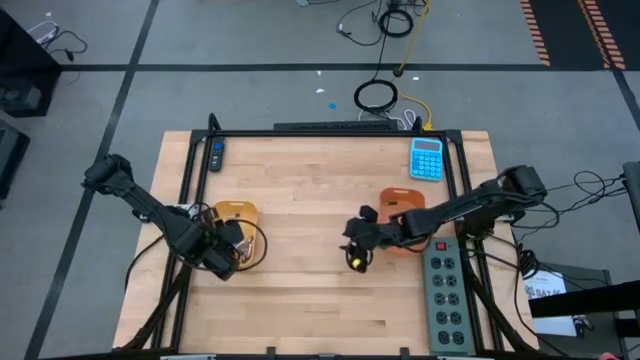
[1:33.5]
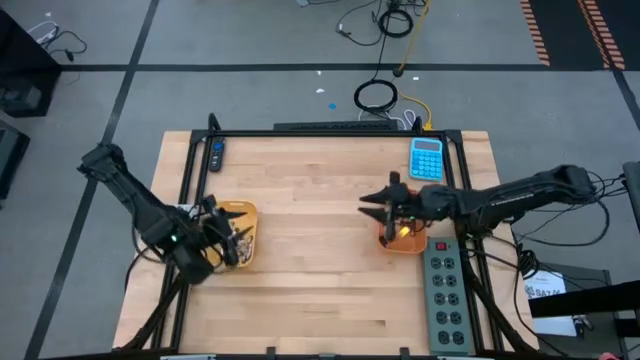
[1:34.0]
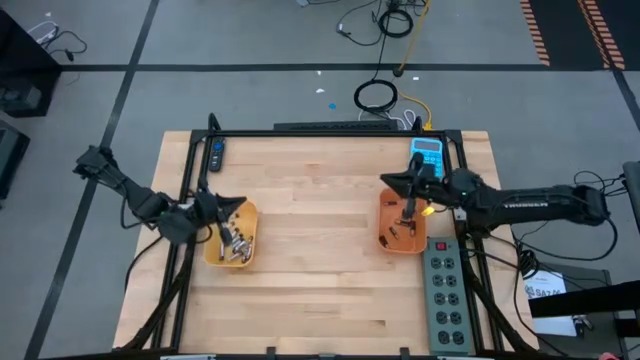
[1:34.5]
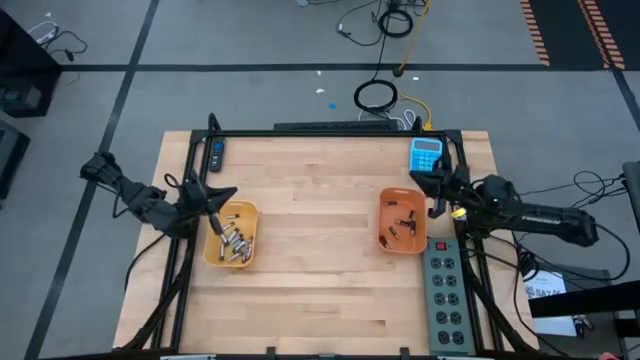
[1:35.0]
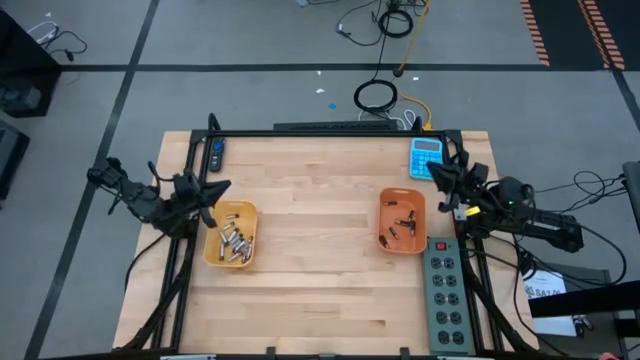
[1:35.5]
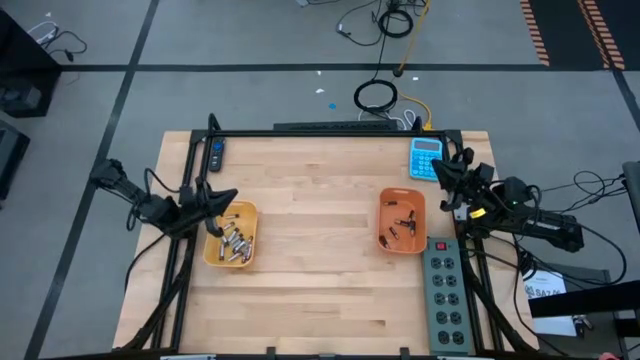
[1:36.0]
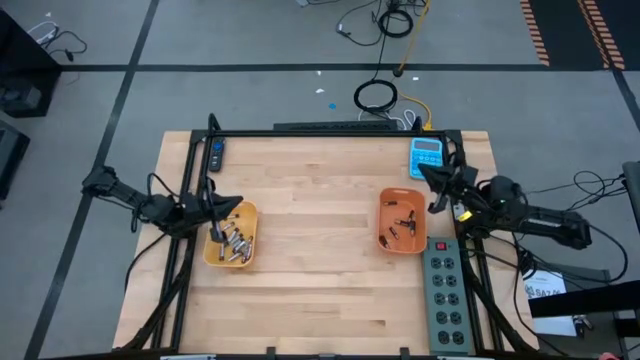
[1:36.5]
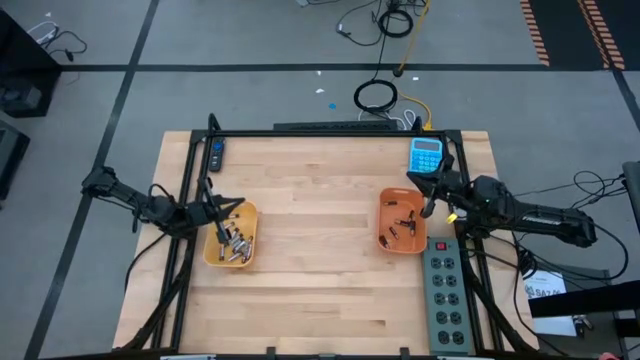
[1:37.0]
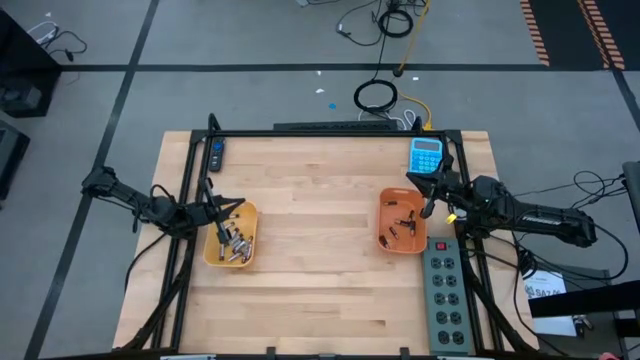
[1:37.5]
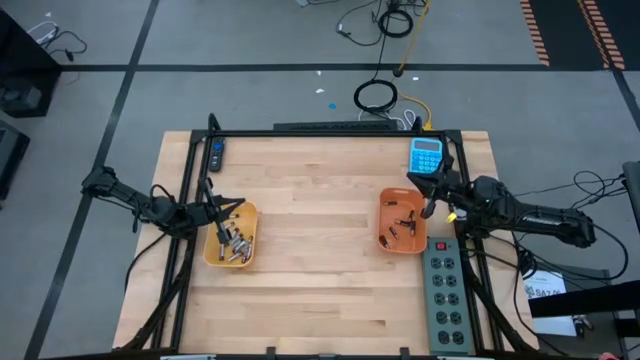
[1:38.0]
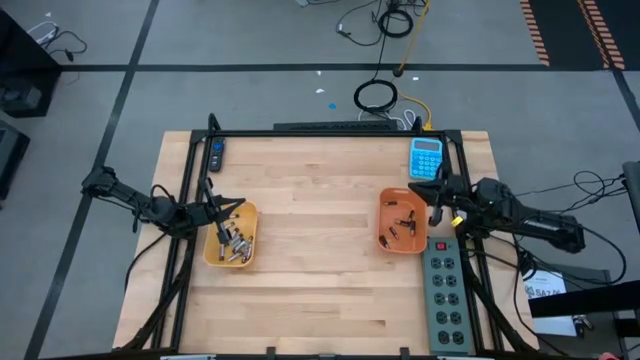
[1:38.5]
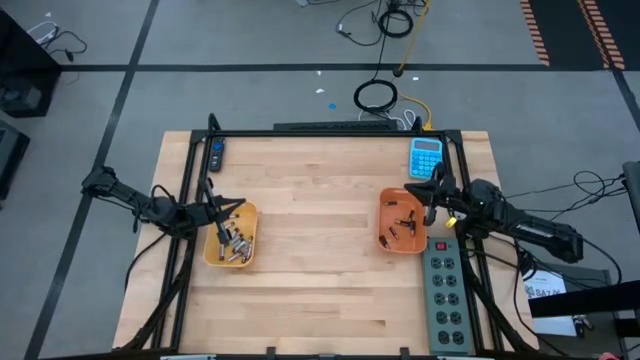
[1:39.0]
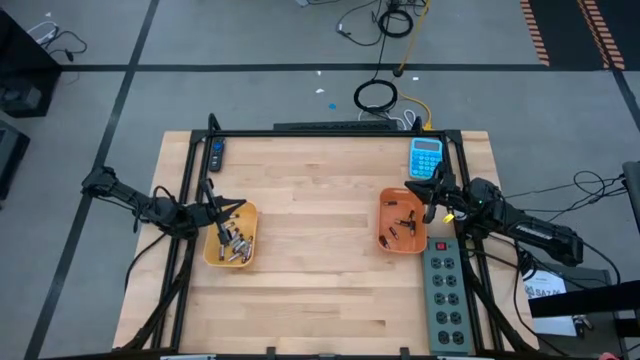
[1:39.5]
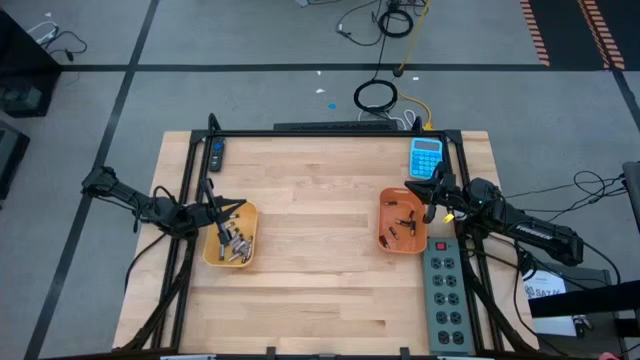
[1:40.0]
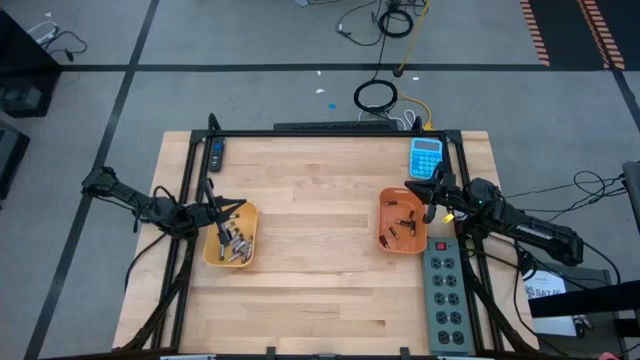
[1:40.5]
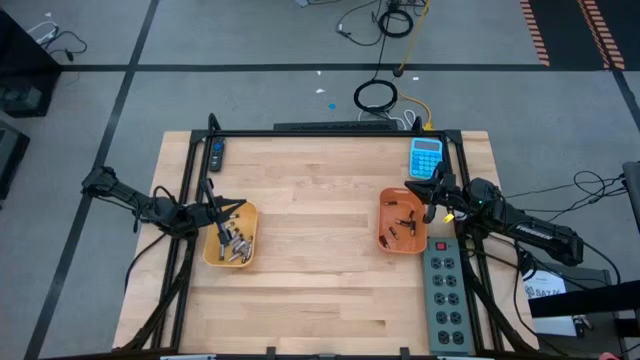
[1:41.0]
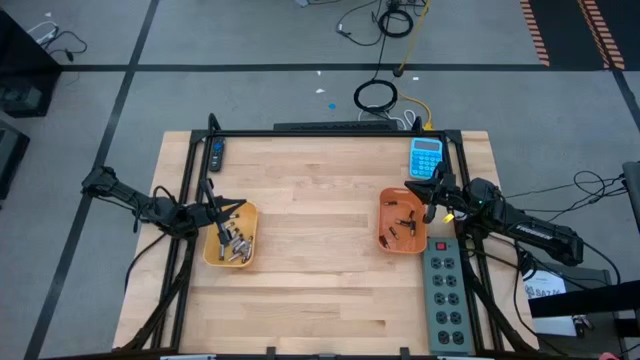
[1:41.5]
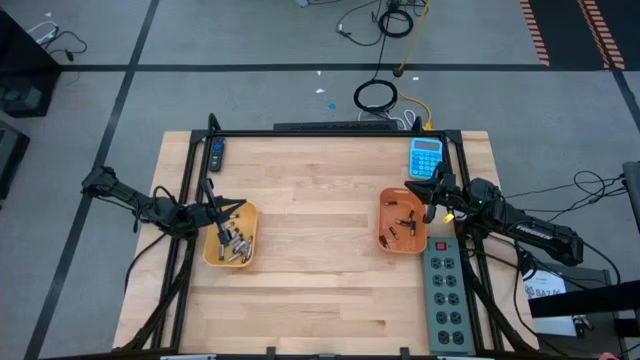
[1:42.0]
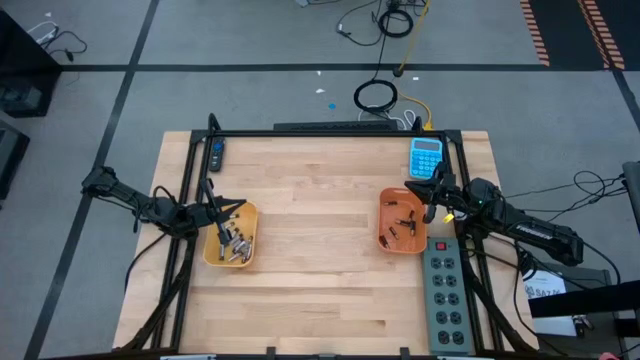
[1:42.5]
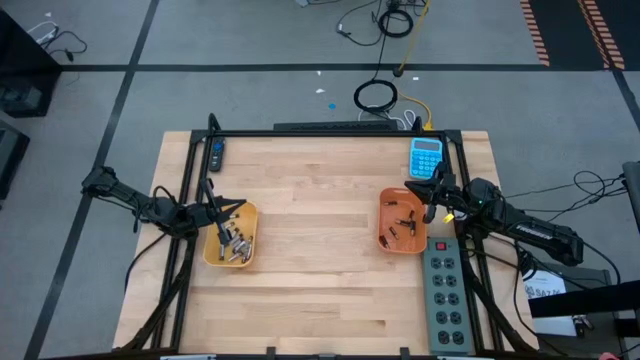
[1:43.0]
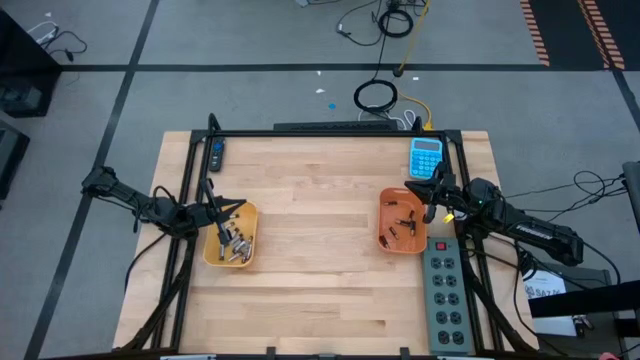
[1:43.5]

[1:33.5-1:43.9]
Task: Sort batteries
Return to Home Position

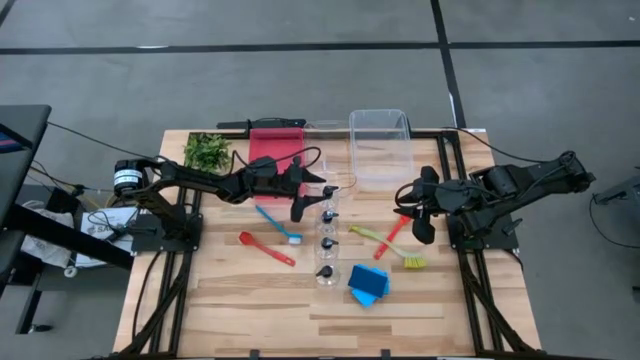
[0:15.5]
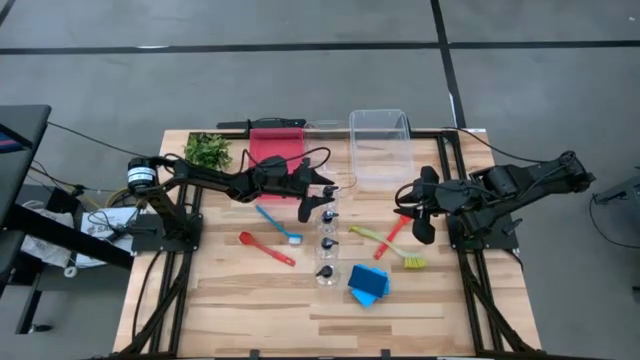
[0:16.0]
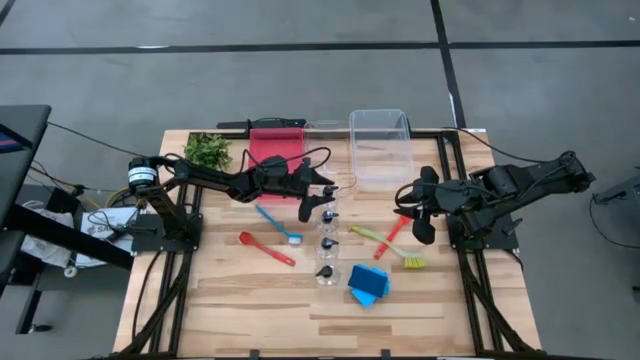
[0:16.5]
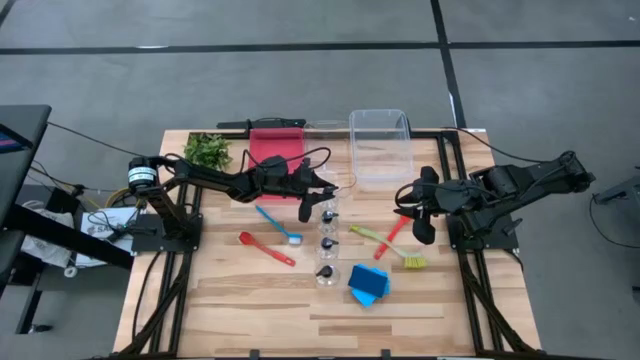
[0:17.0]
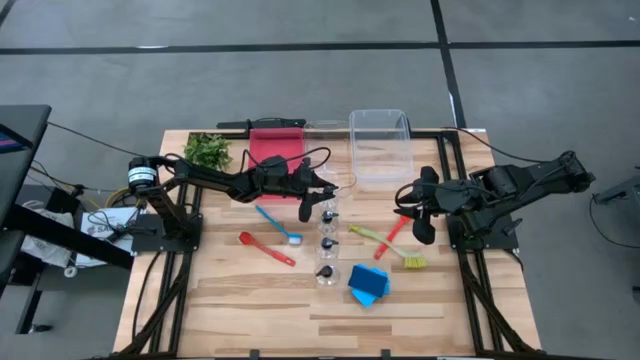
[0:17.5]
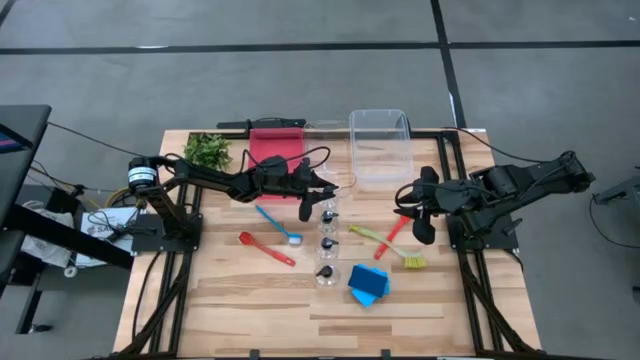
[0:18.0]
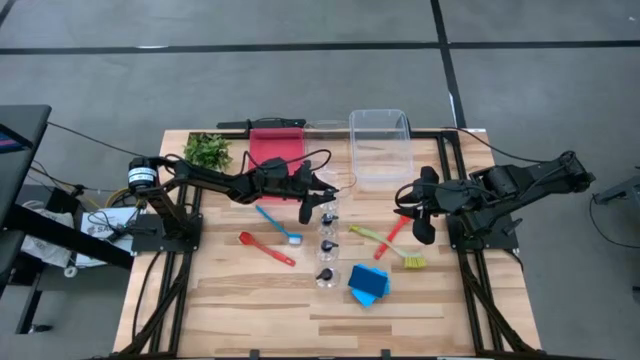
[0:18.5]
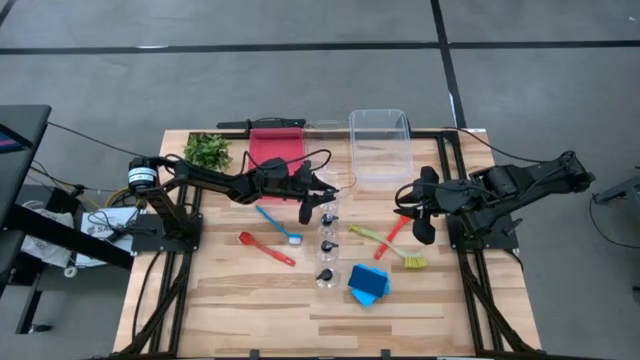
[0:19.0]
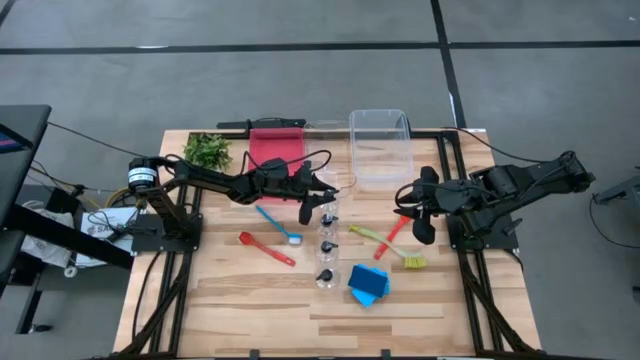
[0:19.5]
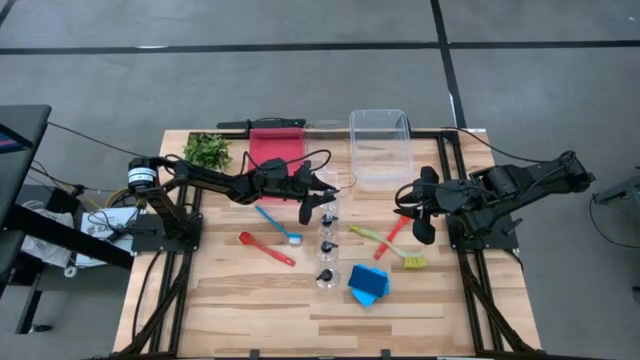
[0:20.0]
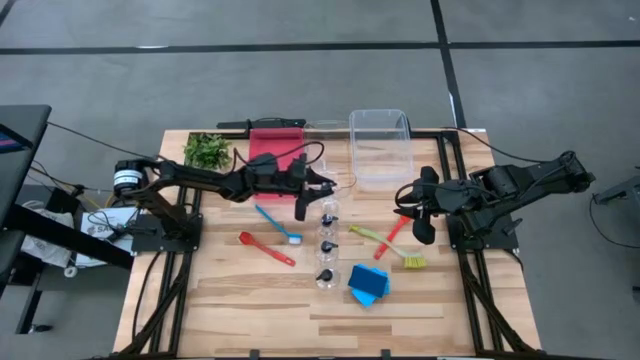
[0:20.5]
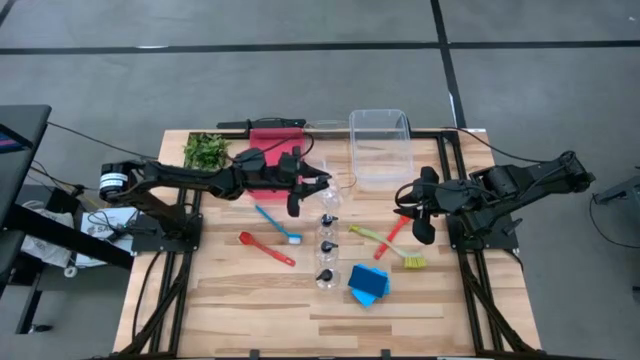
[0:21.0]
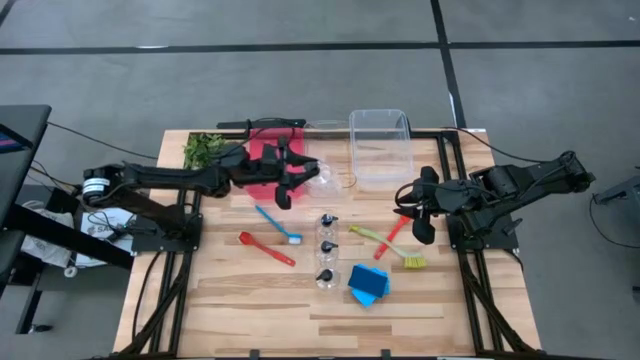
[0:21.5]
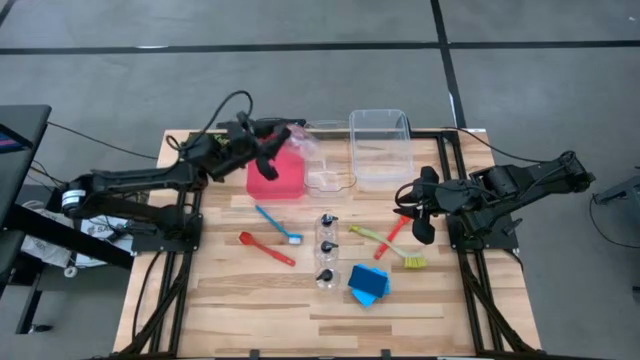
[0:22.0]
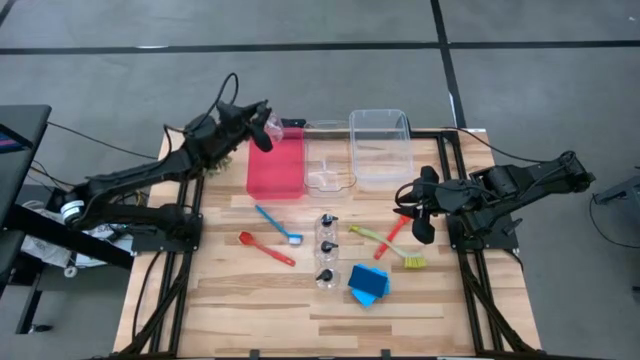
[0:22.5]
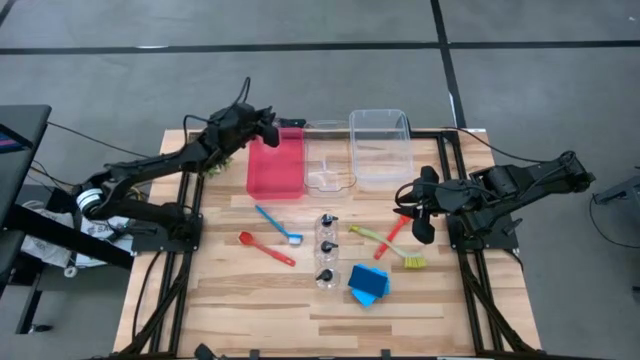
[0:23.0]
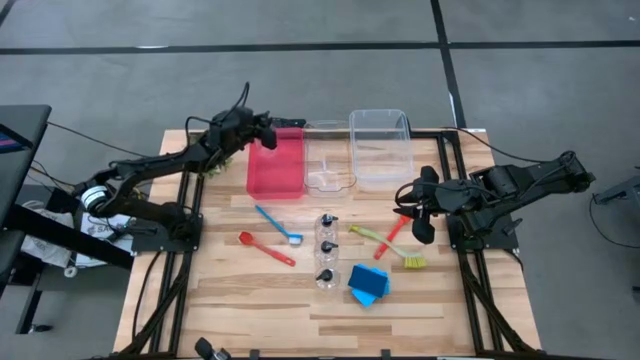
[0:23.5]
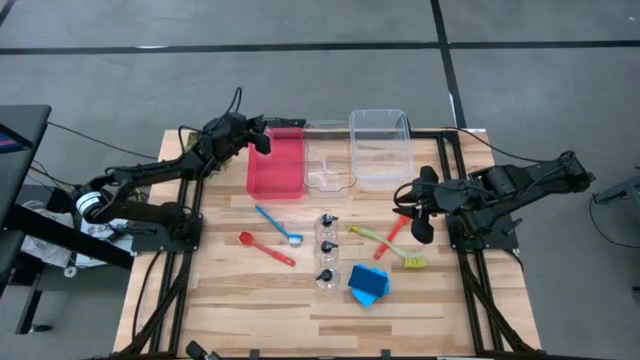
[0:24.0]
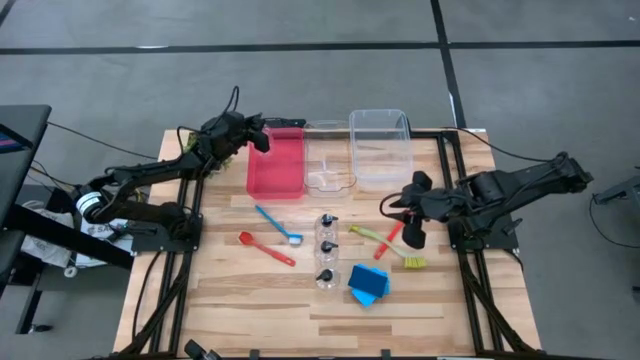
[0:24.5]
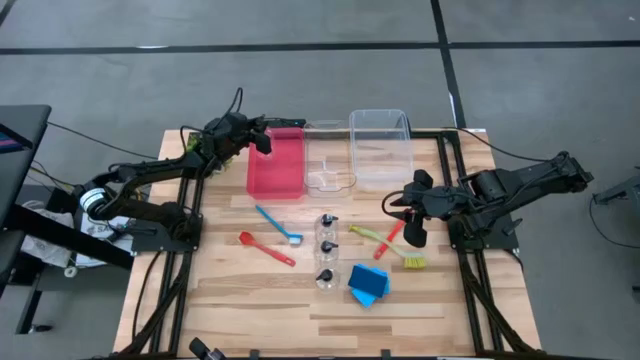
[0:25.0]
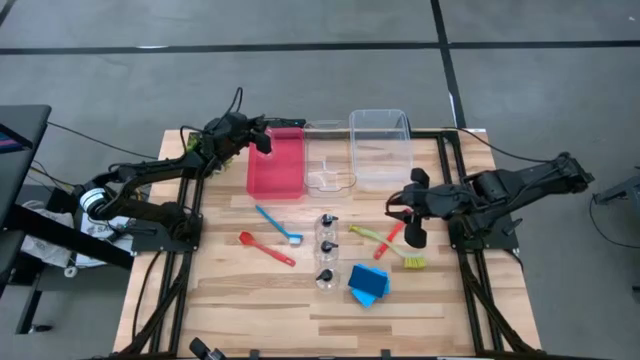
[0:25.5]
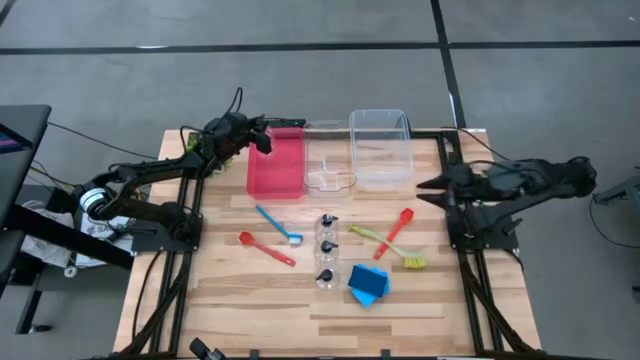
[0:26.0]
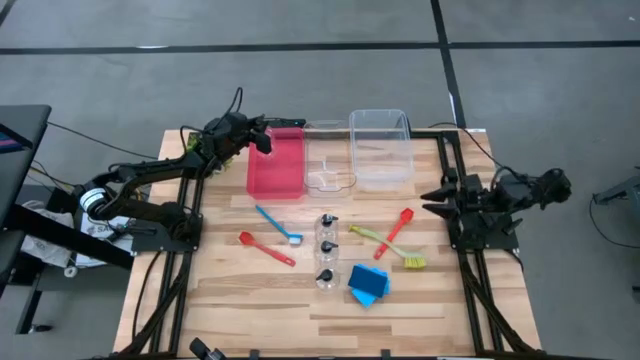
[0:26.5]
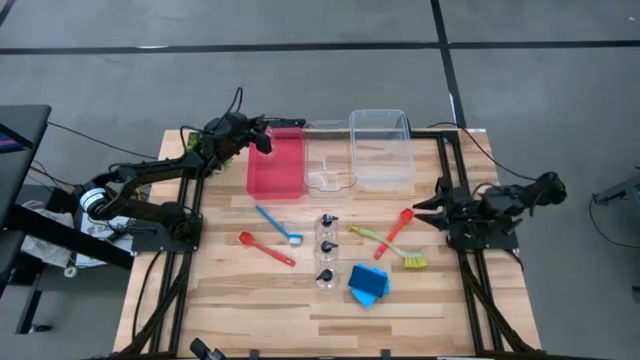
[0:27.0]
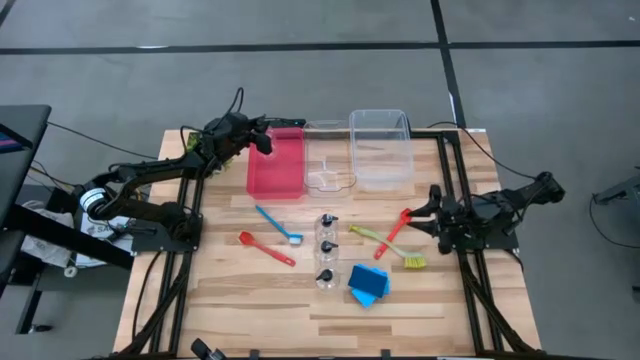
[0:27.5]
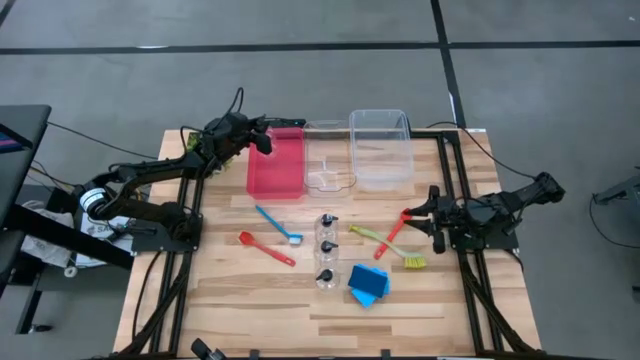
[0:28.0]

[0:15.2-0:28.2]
Task: Pick & Place Kitchen Sink Supplies
Put the spray bottle into the pink bin
